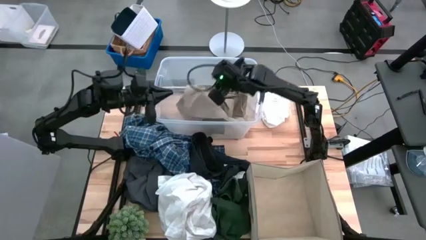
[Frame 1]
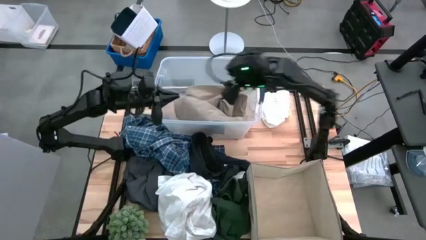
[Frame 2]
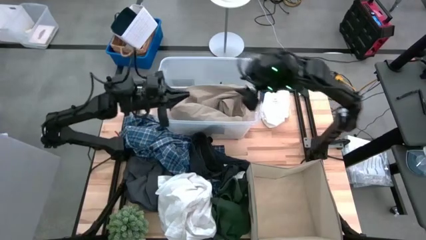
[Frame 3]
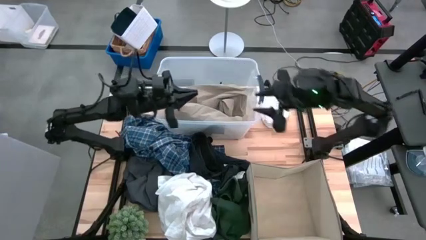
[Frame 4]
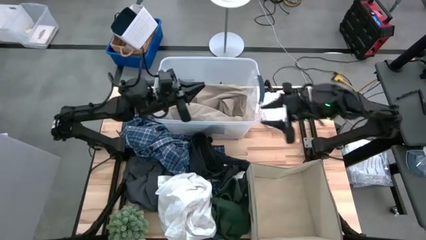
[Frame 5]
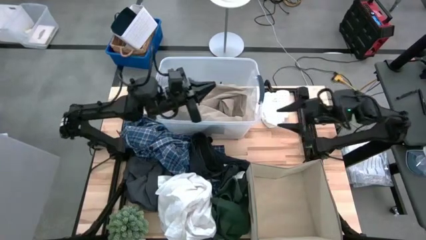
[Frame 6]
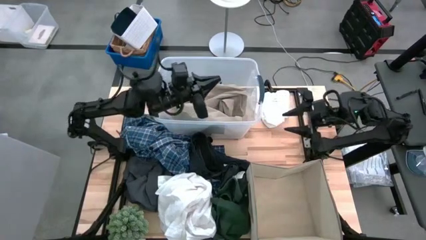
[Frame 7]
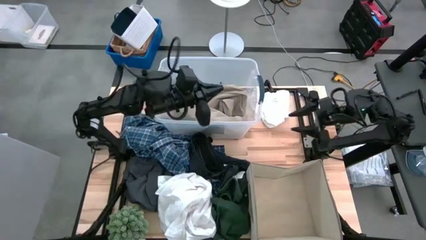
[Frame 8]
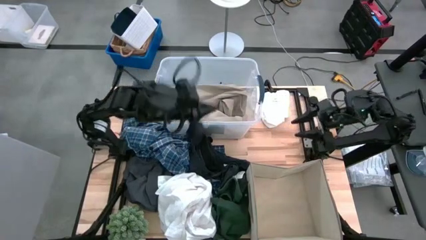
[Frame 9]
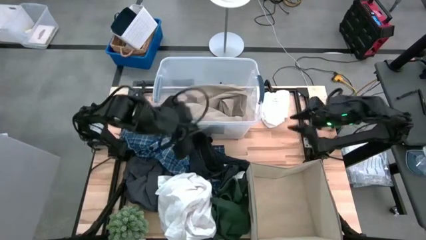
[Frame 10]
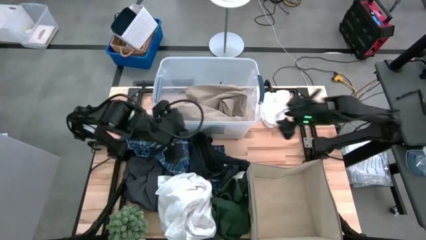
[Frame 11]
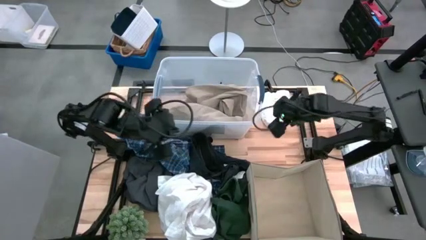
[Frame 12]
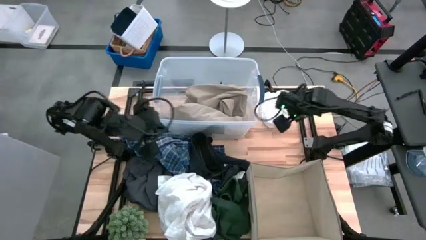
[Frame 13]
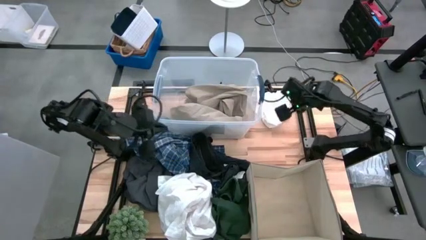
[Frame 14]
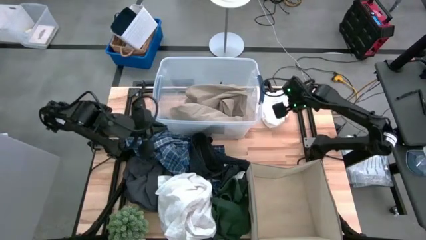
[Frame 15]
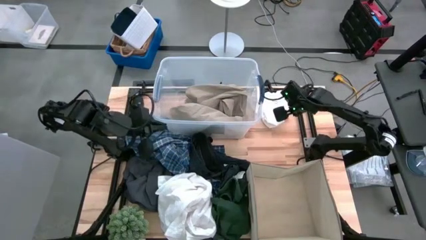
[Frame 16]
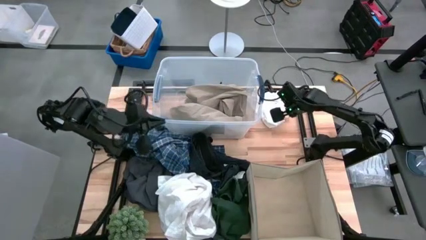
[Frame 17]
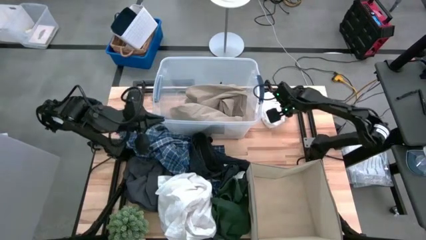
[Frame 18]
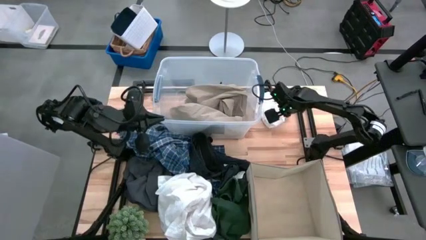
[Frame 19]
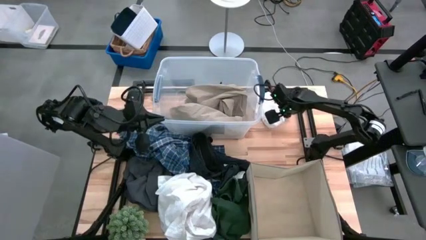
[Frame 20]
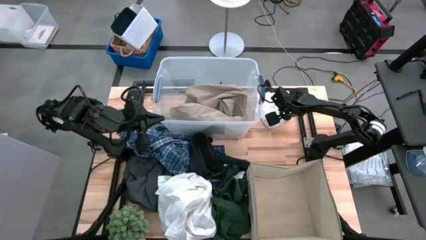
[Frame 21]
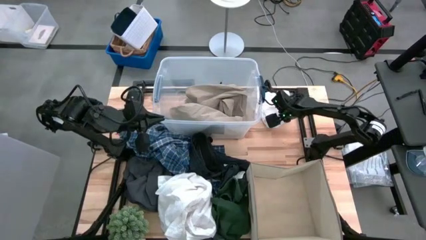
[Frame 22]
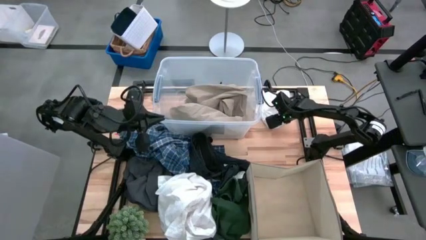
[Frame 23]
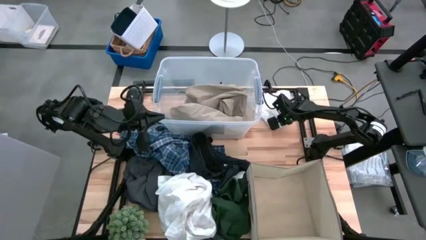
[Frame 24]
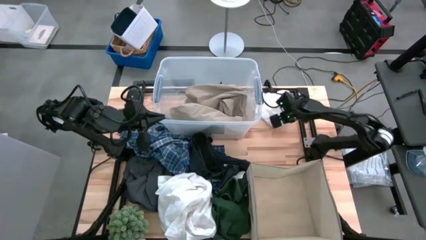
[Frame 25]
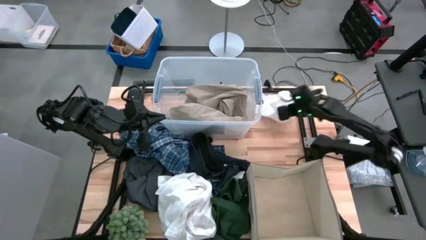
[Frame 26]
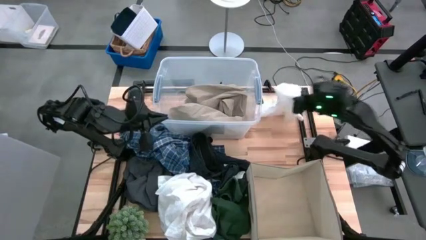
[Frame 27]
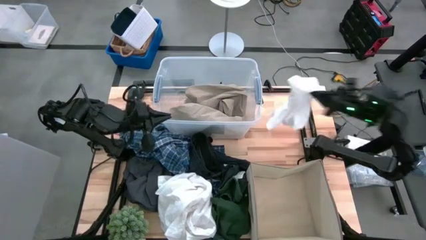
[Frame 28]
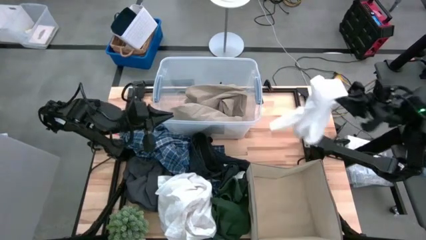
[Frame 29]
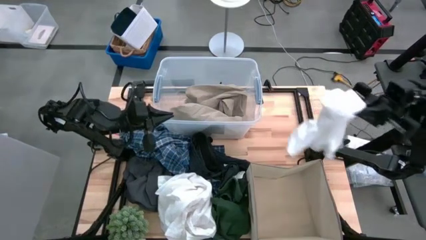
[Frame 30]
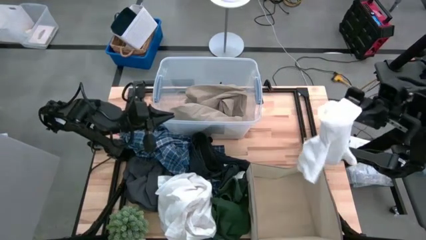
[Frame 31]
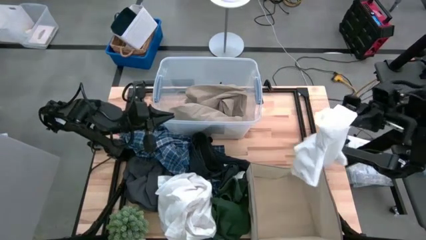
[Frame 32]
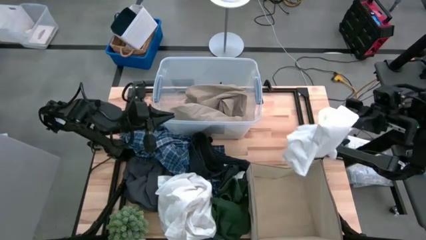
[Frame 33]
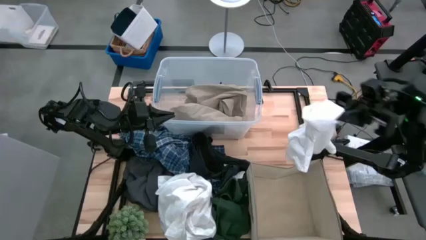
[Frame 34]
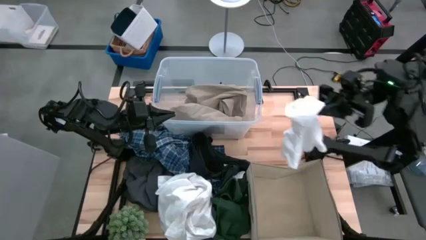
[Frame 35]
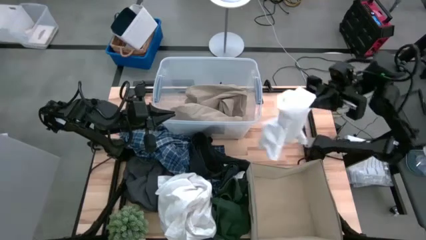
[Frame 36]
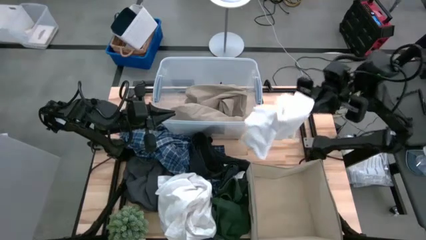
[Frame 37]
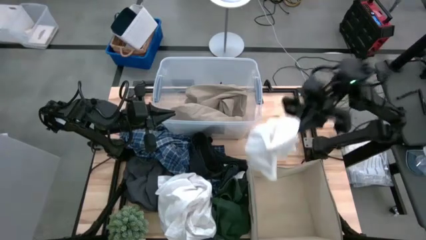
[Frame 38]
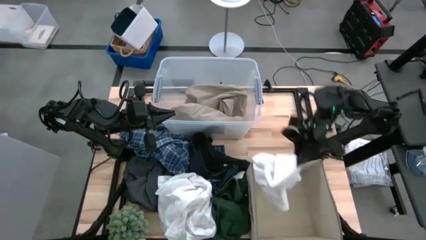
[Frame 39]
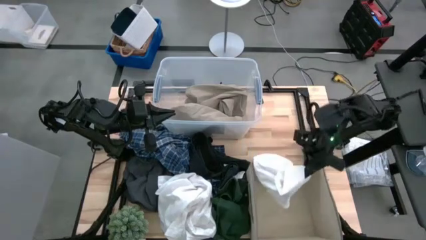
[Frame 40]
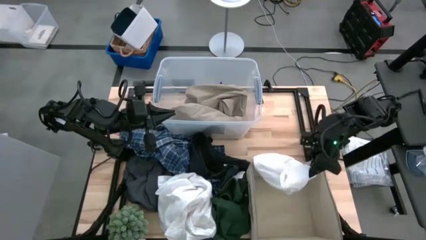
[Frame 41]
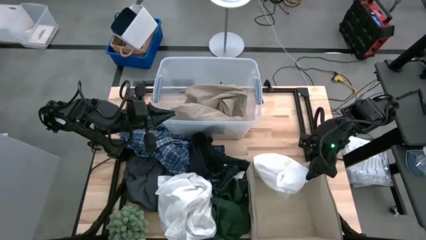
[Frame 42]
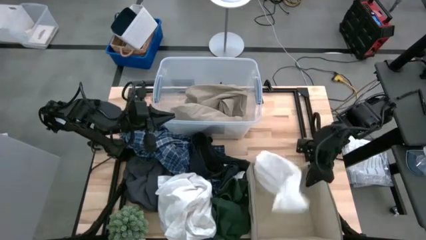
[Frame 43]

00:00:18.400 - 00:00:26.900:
Task: Sort clothes
Put the white shorts into the brown laundry organizer

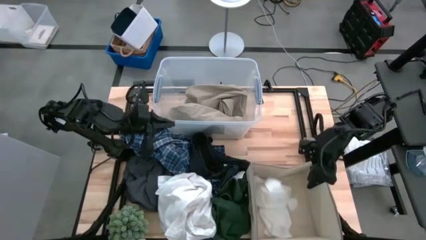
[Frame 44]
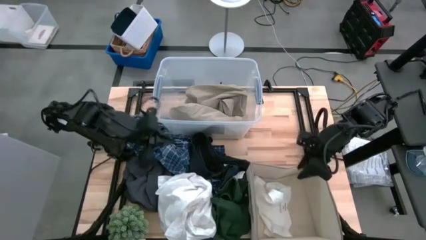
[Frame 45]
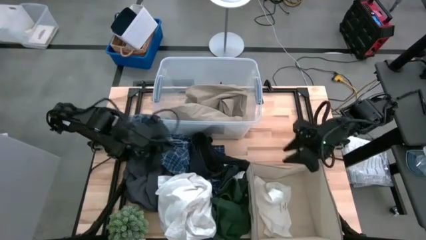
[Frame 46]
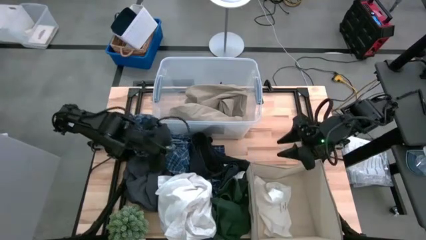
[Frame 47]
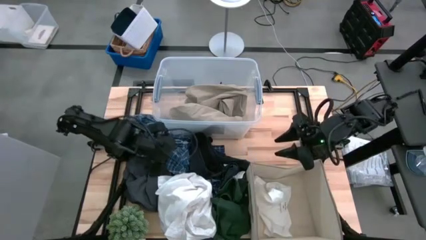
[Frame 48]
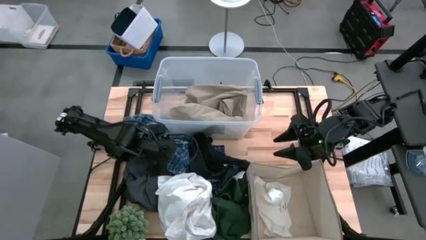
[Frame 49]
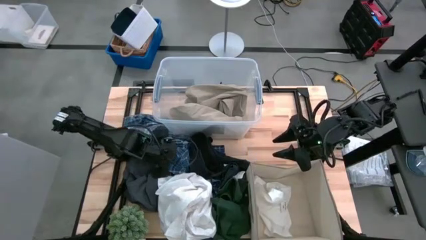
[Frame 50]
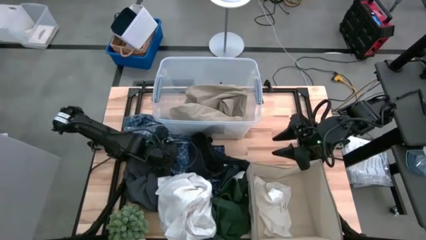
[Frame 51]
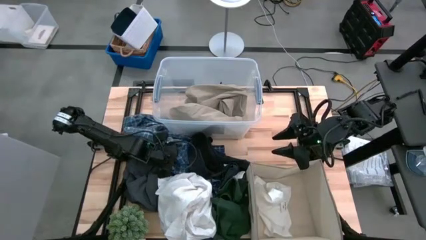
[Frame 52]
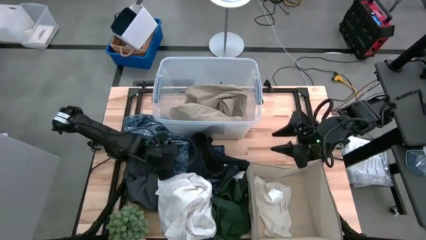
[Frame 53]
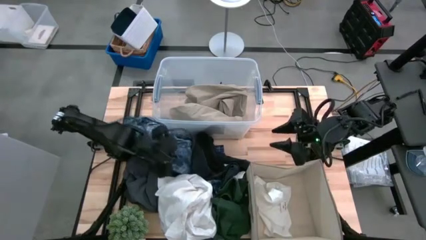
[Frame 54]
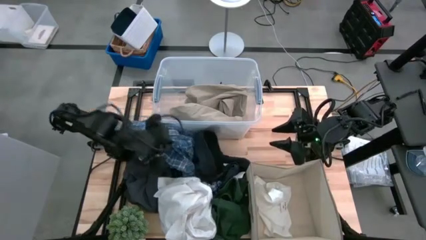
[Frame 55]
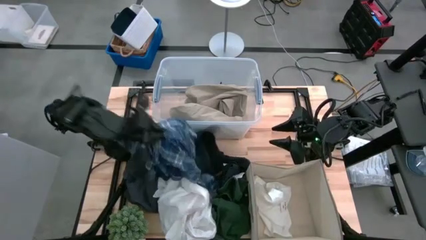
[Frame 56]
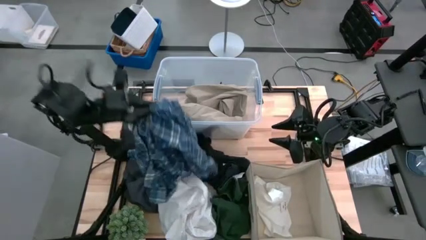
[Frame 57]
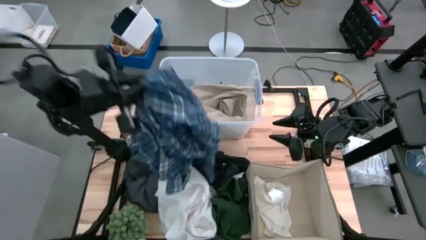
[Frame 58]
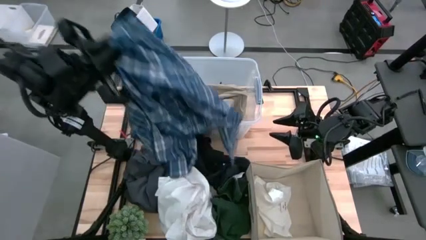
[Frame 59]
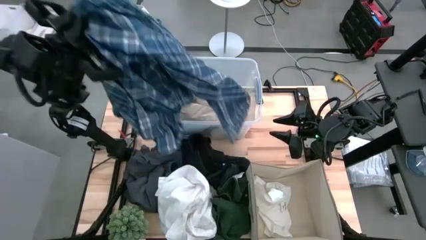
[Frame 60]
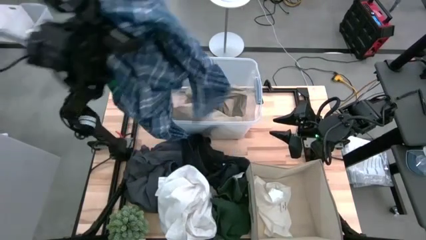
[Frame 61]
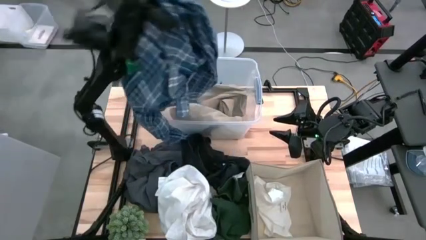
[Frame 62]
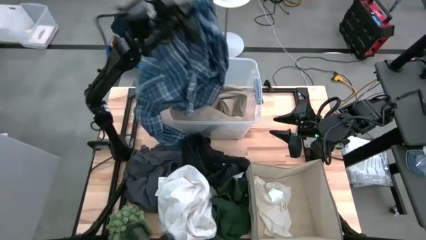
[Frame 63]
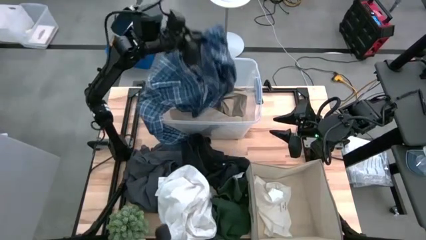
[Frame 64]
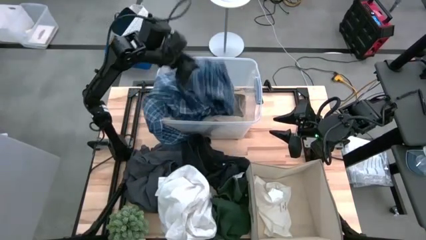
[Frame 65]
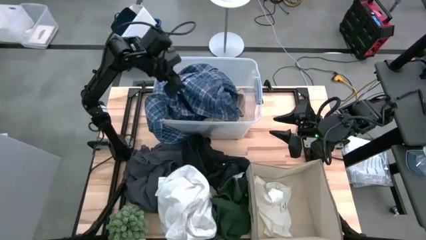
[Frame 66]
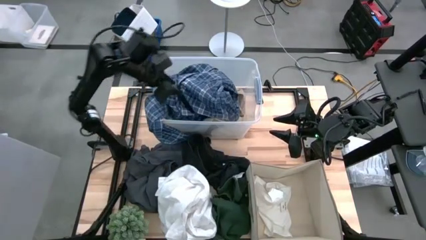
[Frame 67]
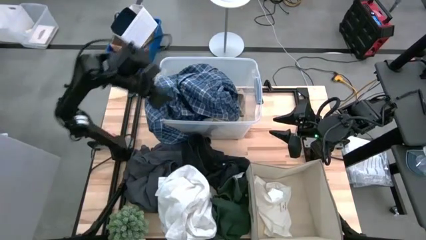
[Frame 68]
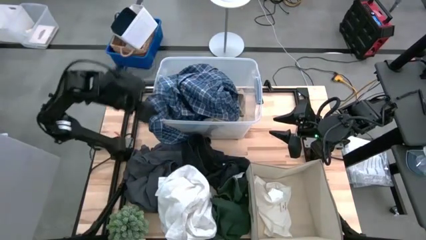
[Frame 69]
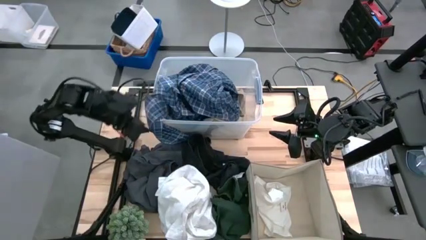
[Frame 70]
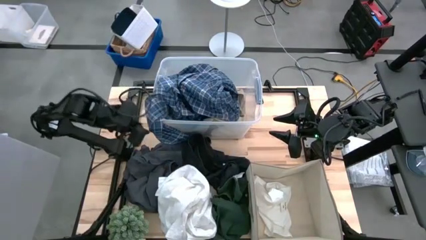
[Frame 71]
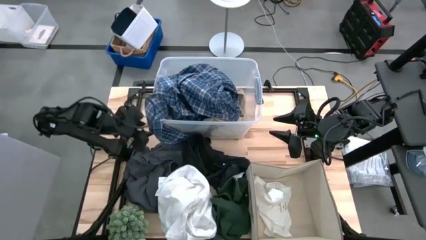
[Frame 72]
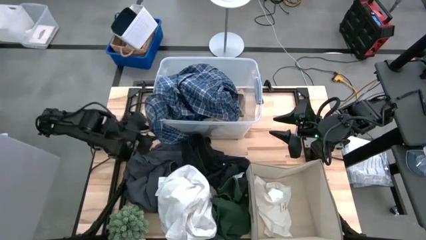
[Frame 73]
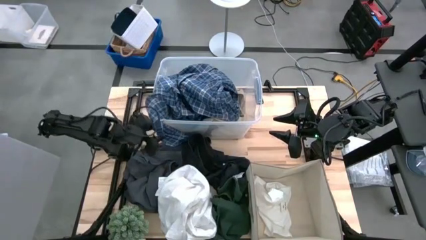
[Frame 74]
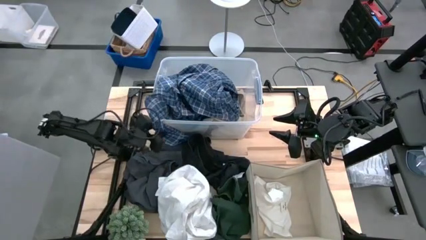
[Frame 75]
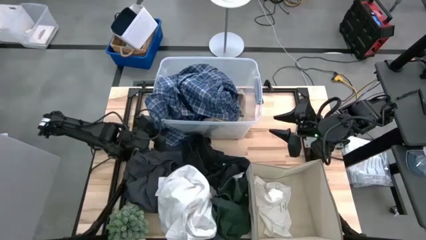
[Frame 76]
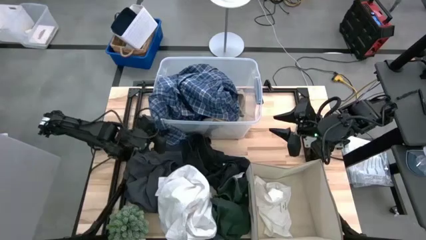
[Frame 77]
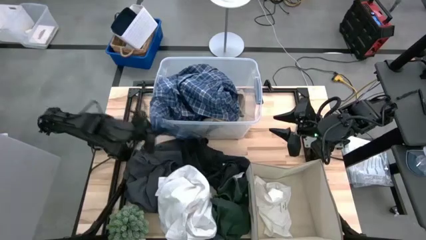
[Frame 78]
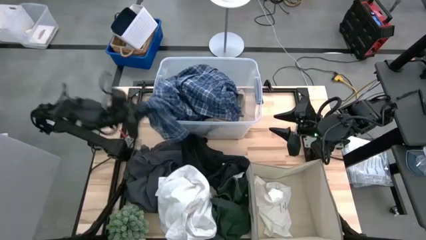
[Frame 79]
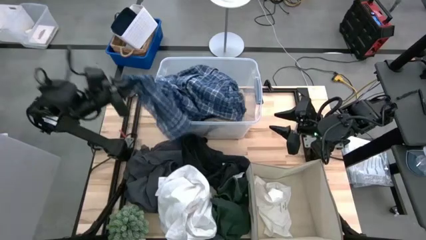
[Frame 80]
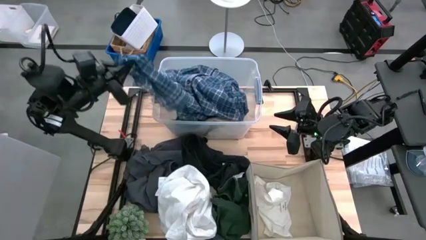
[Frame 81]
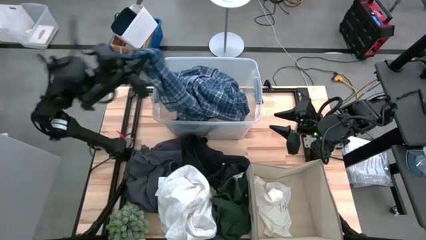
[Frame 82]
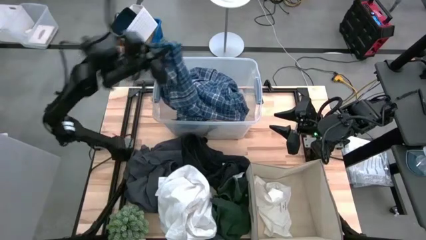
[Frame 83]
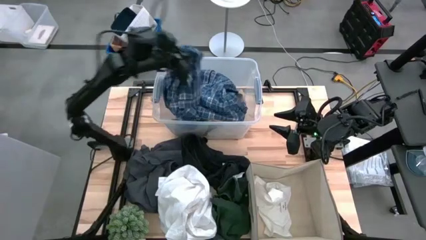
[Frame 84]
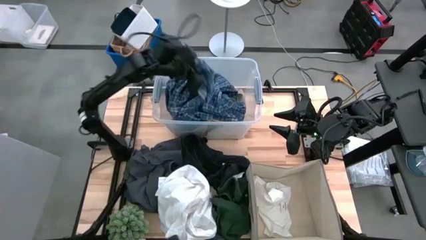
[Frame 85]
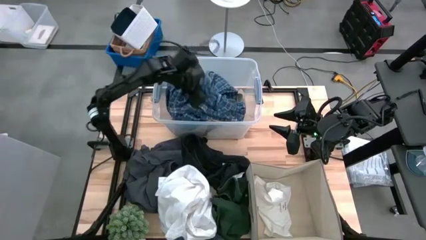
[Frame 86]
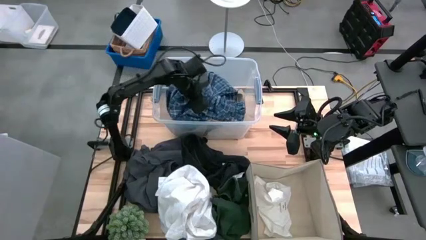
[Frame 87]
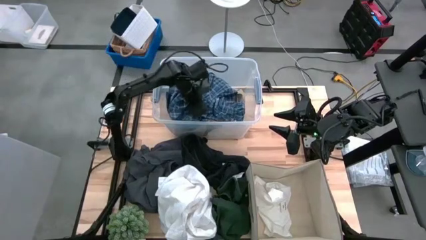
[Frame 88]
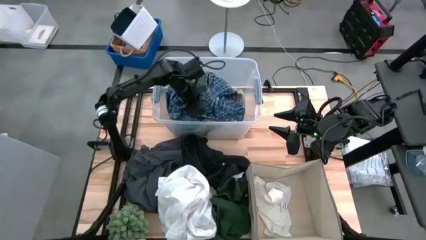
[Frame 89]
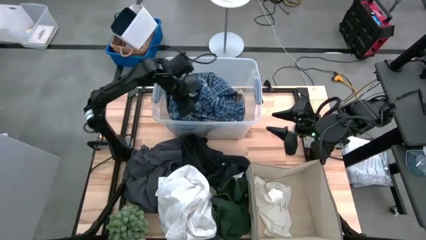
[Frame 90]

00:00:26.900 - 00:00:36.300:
Put the blue checkered long sleeve into the transparent bin
